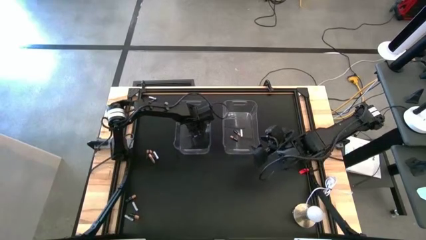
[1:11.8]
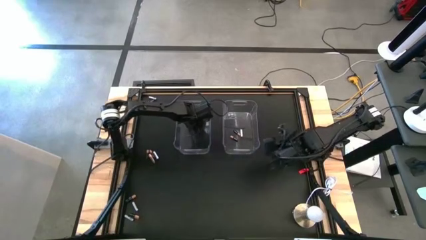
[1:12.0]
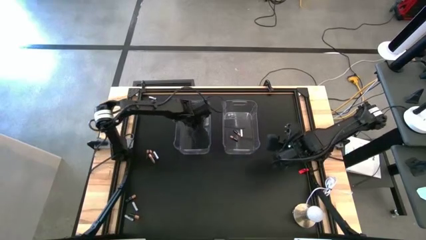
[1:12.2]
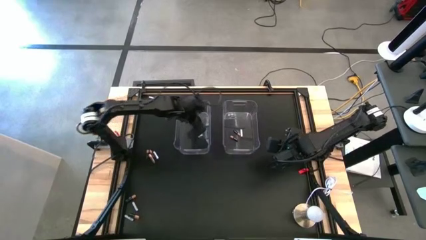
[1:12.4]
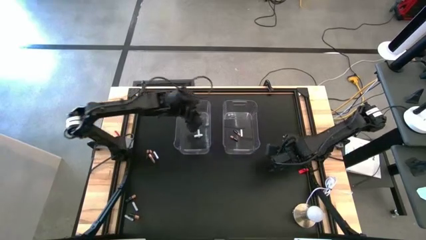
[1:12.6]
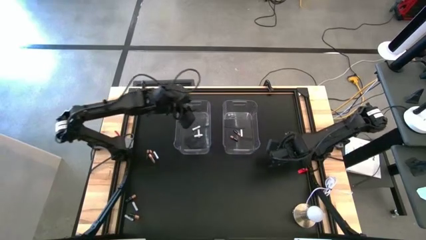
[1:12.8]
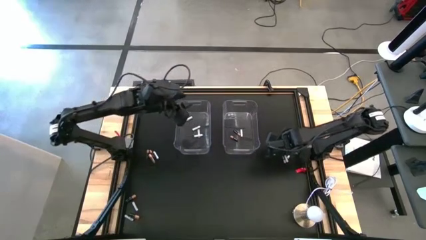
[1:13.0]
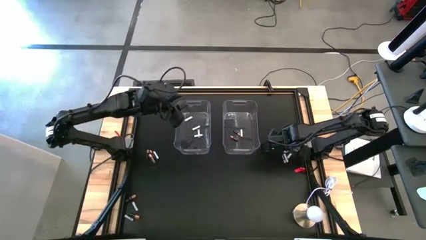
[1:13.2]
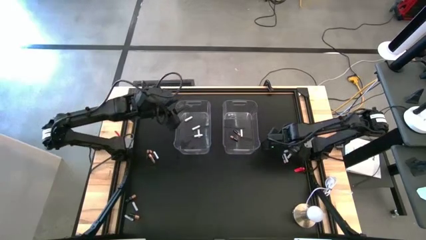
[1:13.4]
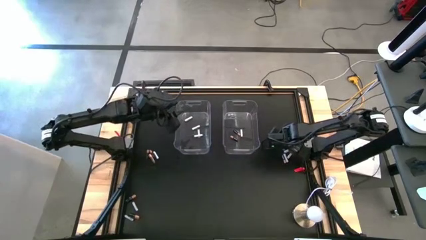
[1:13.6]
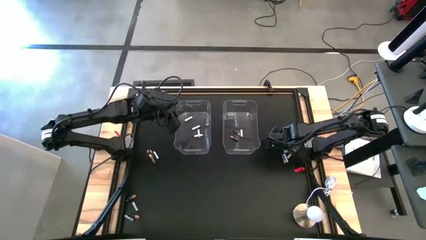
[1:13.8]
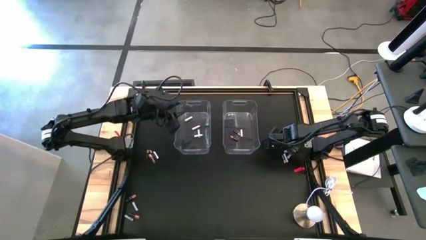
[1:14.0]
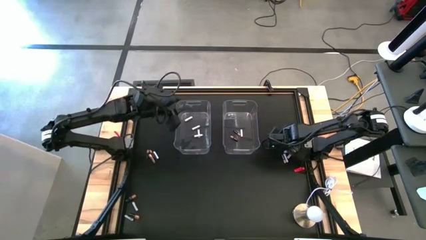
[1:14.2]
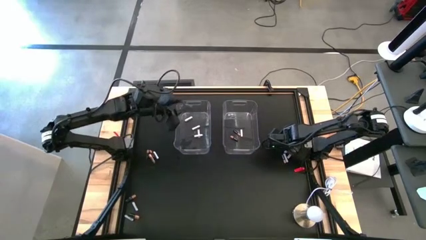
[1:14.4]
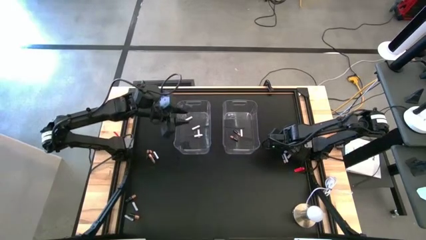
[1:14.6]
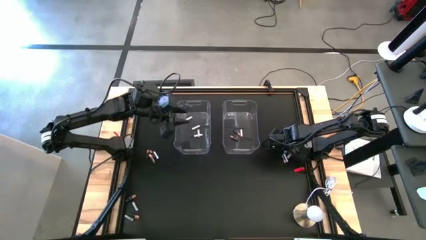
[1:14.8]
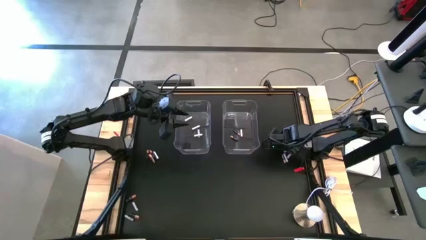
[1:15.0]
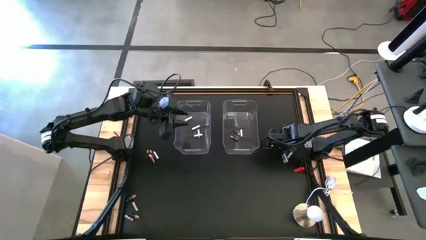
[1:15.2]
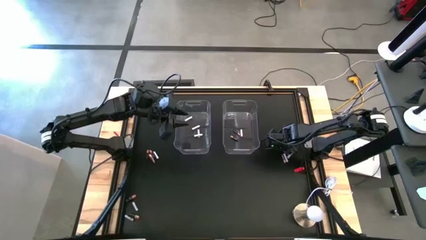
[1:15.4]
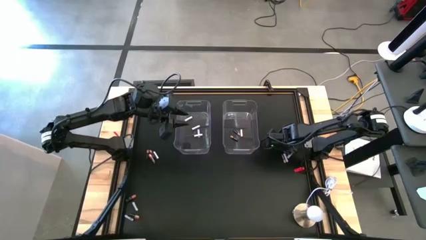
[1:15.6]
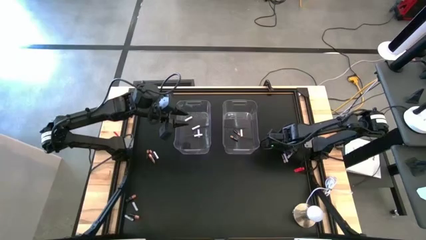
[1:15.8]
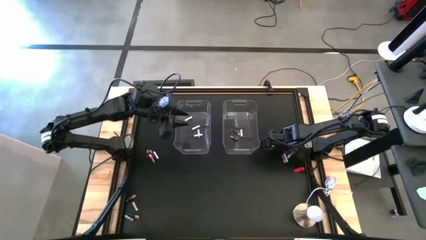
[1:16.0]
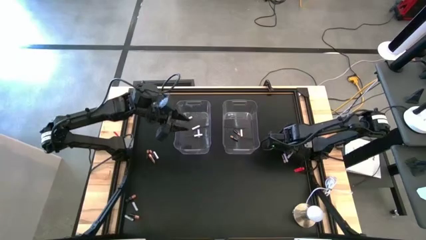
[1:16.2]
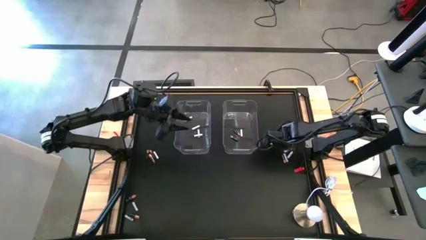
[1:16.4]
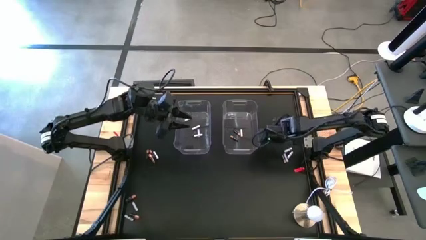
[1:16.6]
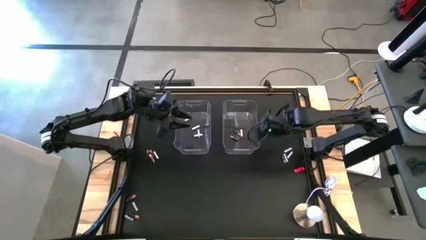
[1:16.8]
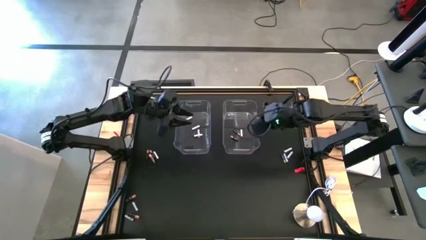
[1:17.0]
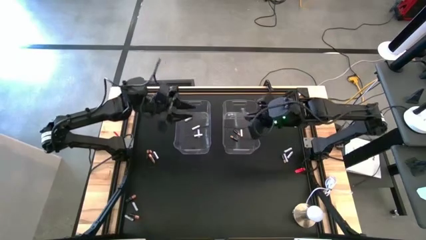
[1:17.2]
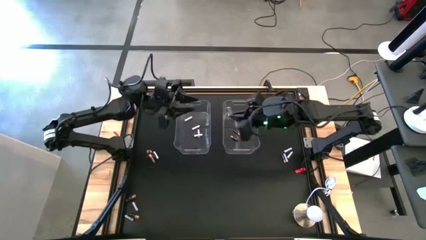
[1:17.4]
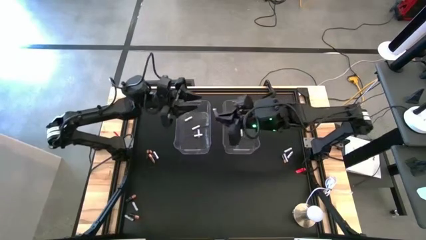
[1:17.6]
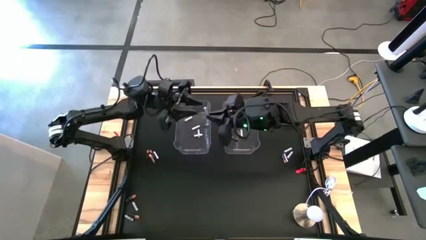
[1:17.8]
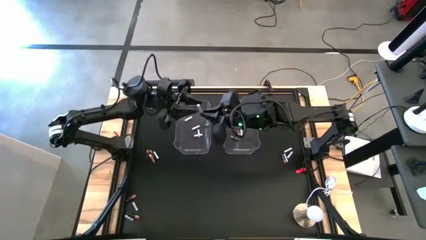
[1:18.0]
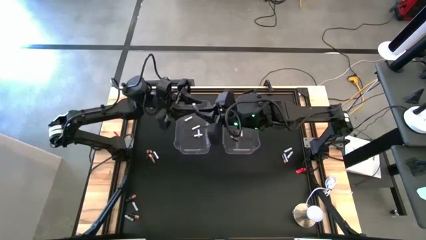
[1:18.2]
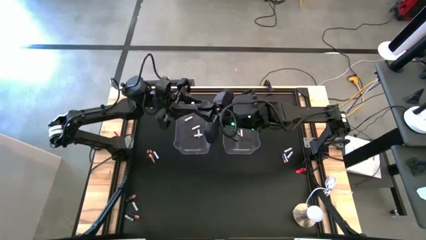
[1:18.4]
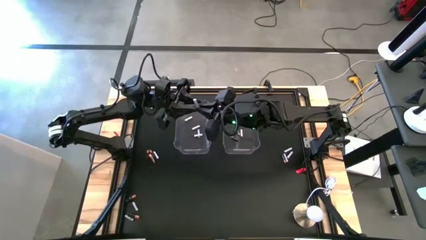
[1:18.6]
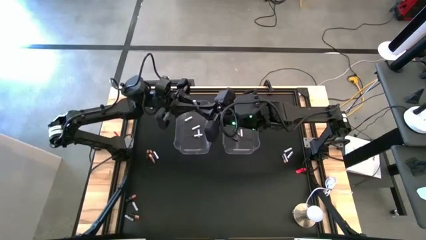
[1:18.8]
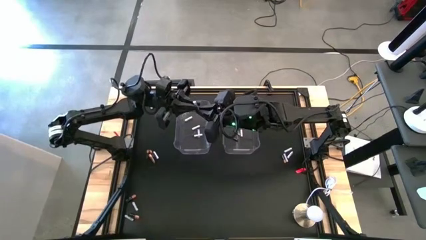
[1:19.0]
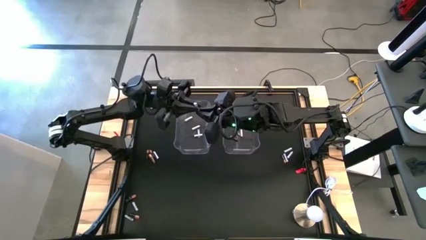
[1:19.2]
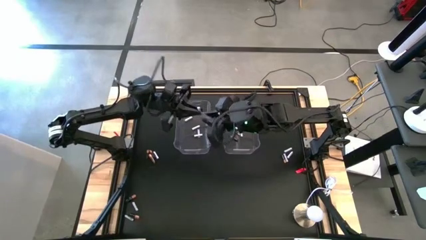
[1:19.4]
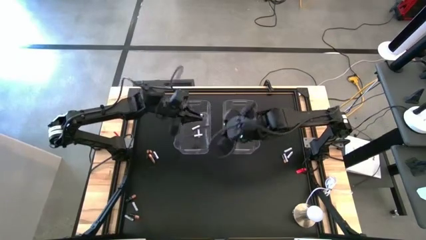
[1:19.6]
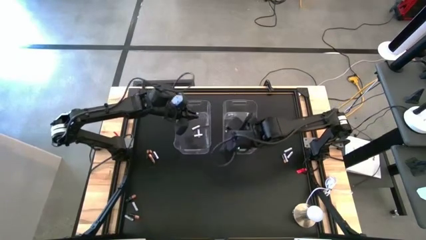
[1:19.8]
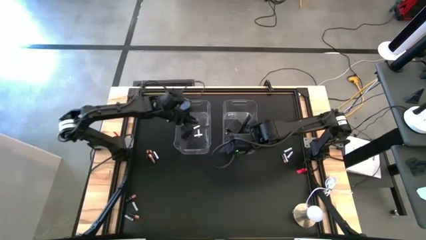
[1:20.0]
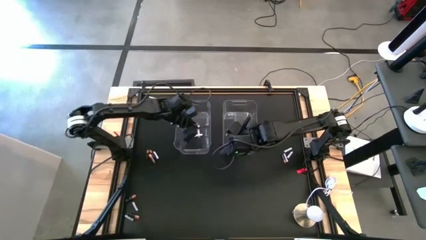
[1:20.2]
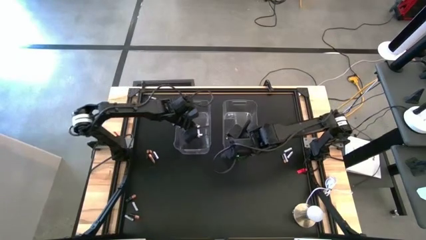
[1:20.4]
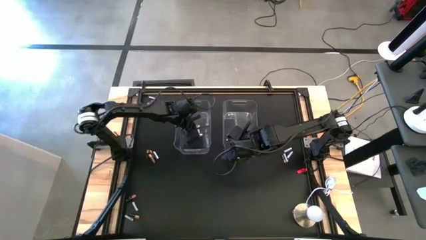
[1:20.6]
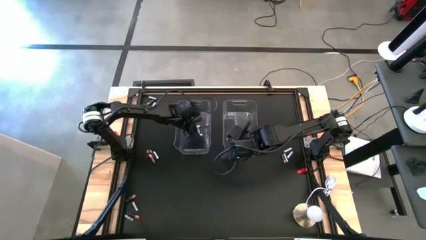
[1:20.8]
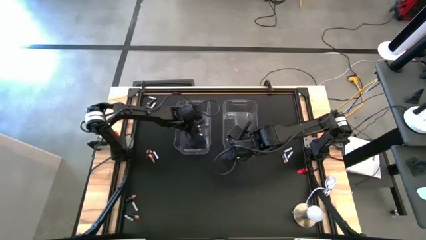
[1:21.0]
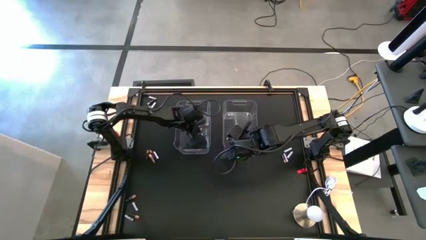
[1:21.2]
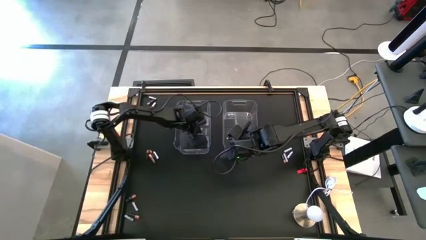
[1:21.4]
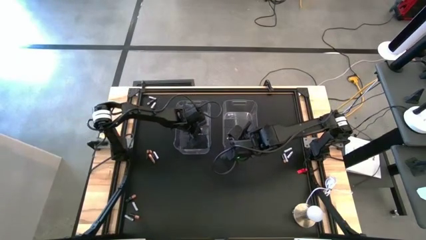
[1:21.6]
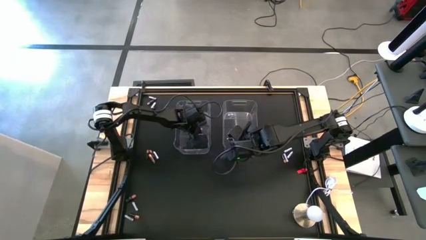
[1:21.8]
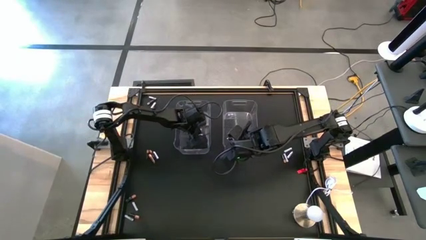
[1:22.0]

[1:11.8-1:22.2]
Task: Sort batteries
Put the white battery into the left transparent bin
